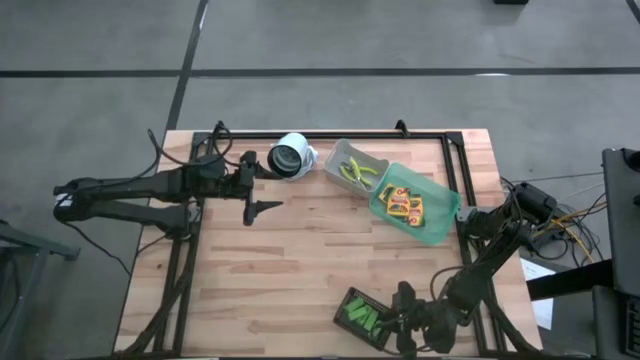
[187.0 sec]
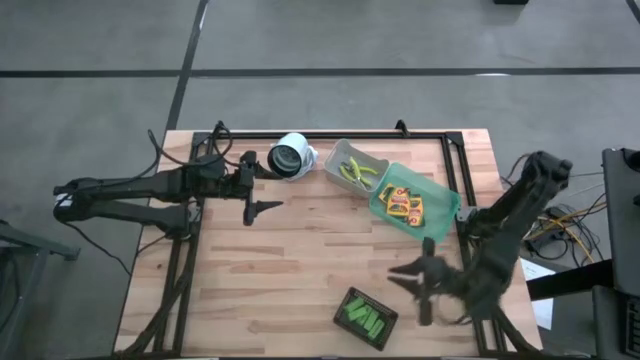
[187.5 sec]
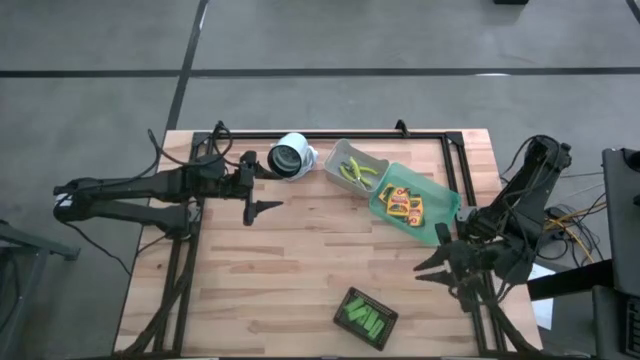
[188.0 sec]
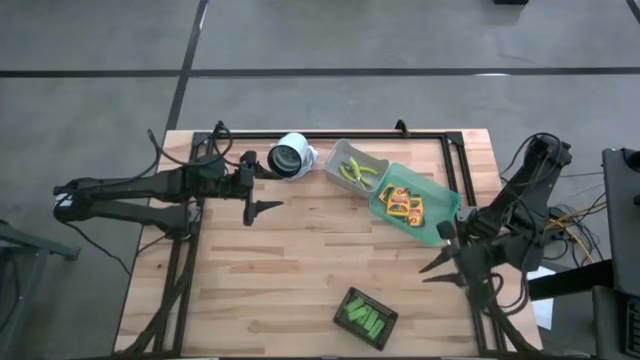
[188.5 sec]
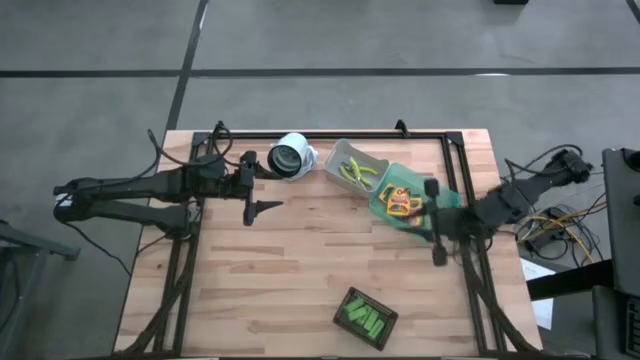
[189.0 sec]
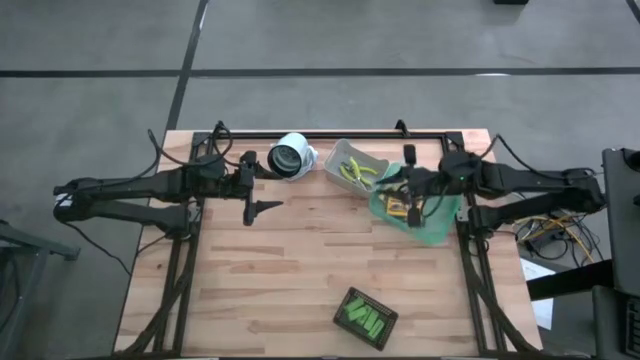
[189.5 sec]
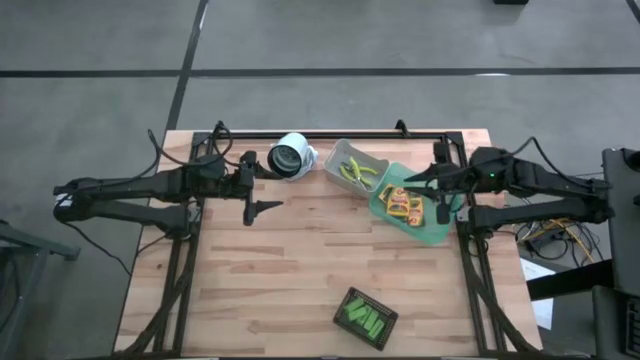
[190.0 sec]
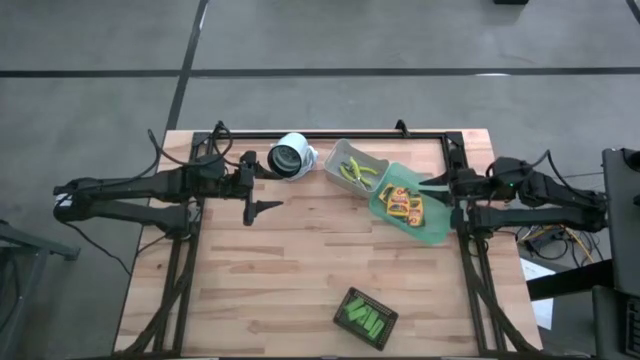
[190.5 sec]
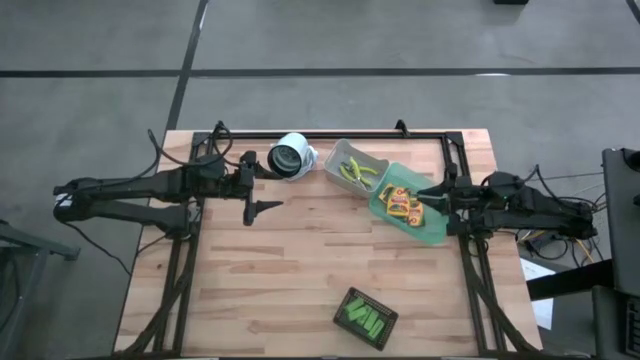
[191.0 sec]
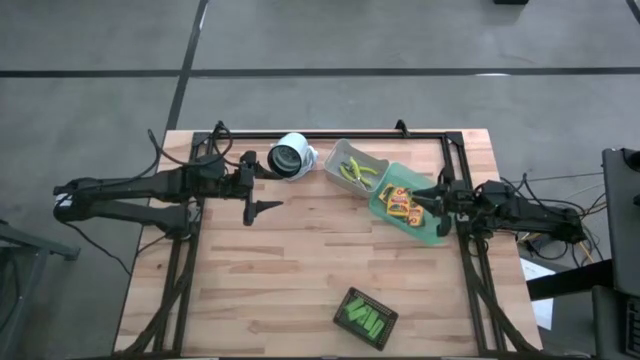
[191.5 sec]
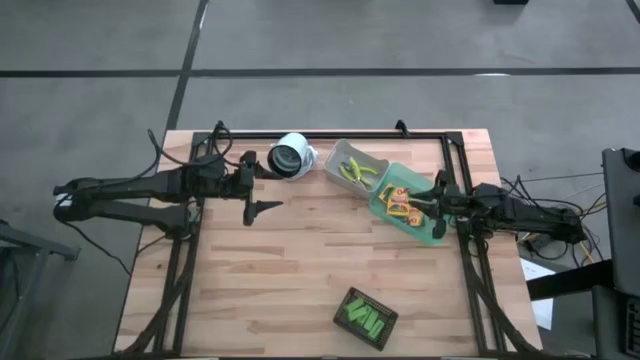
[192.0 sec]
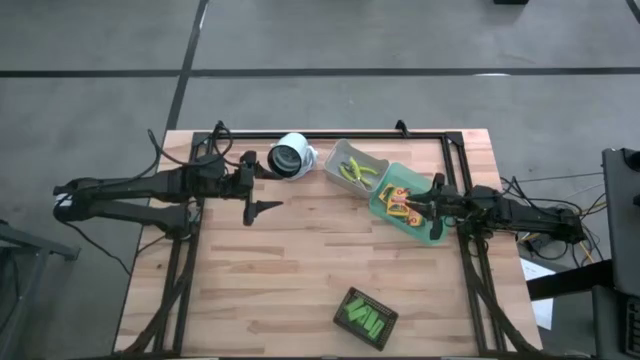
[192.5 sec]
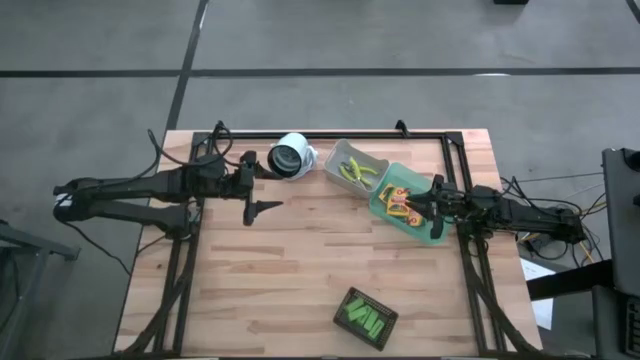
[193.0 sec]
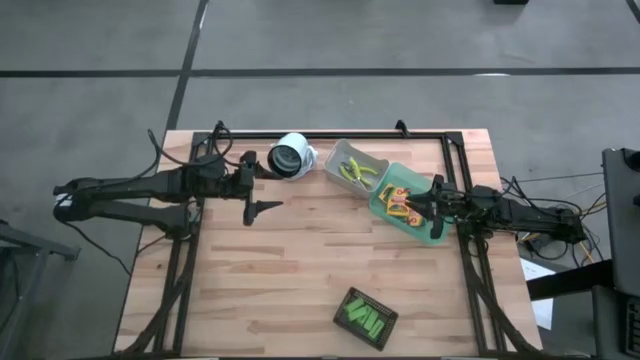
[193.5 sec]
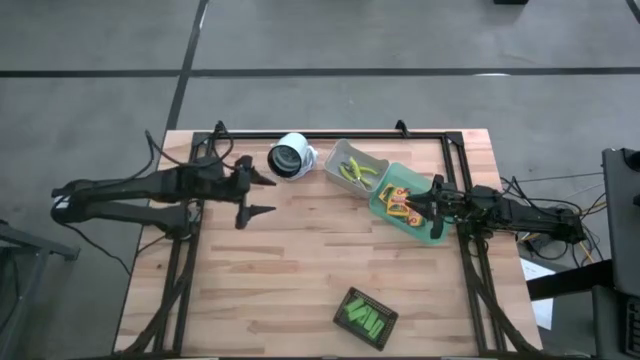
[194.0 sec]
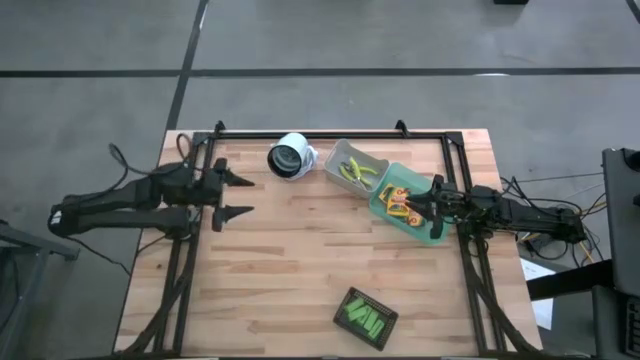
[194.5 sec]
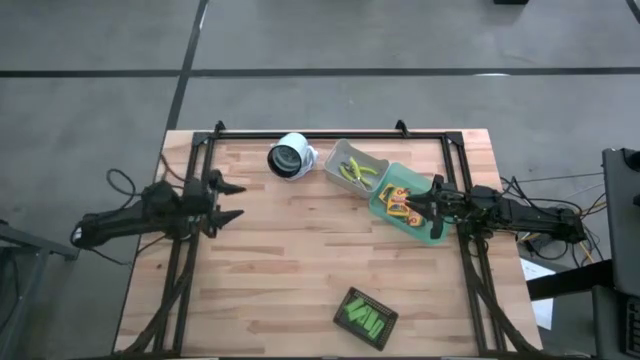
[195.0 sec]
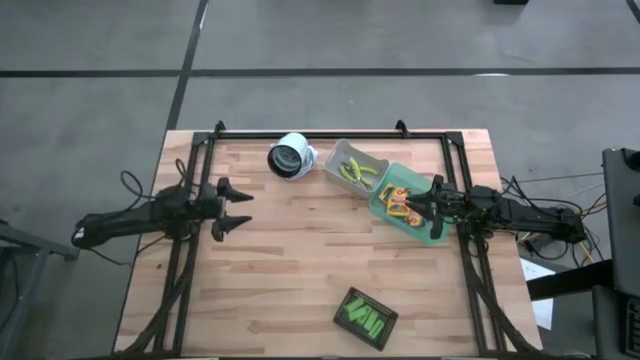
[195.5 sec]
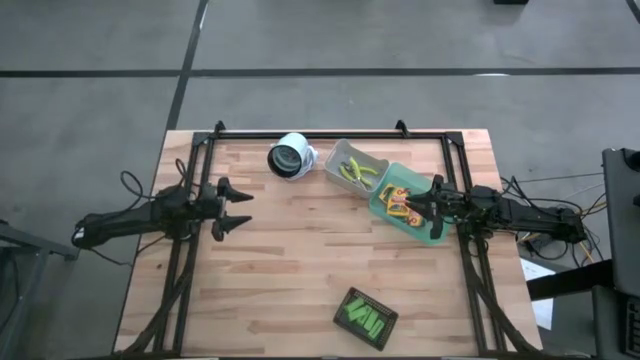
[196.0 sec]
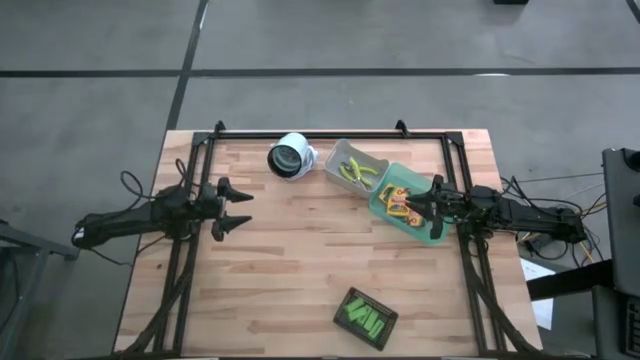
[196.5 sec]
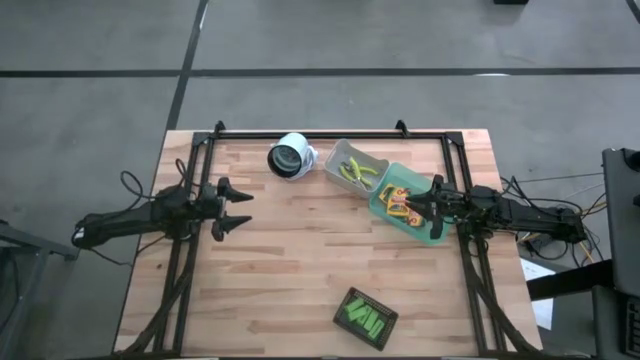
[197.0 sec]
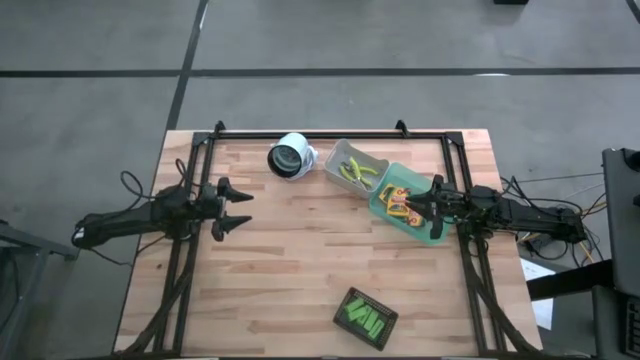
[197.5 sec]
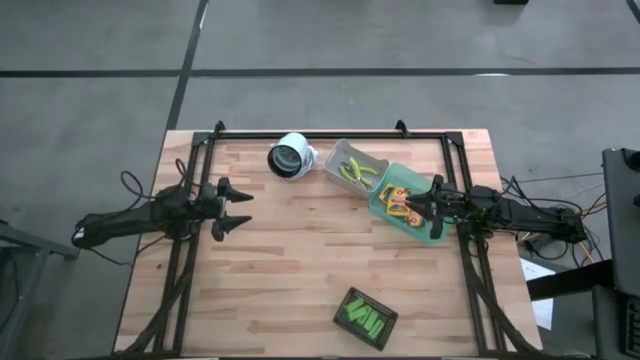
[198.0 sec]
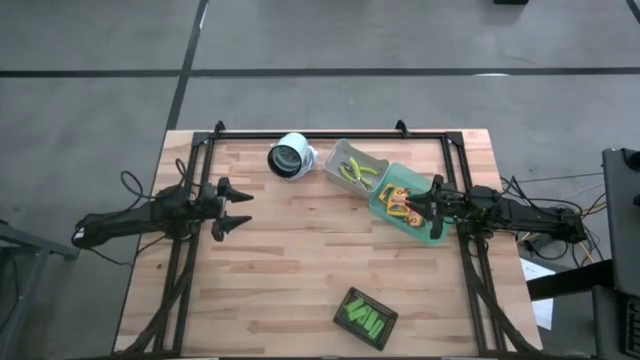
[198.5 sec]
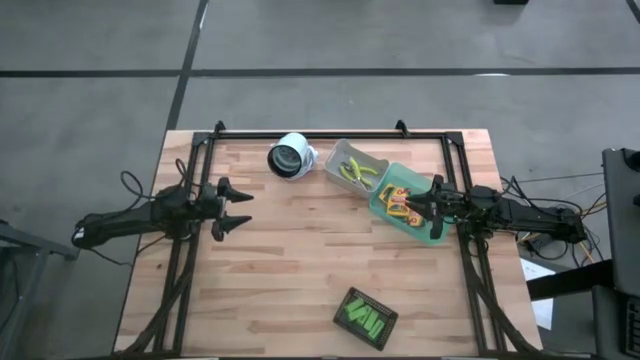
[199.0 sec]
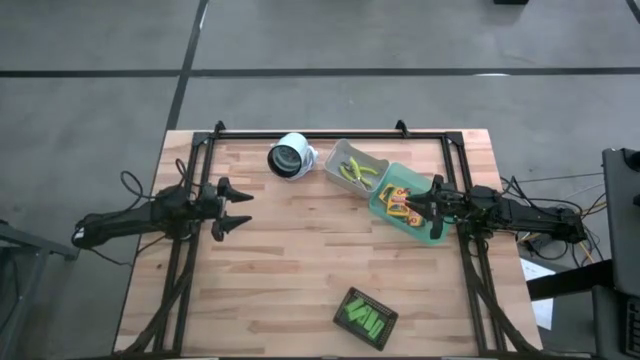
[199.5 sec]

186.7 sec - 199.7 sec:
Task: Pick & Place School Supplies
Return to Home Position

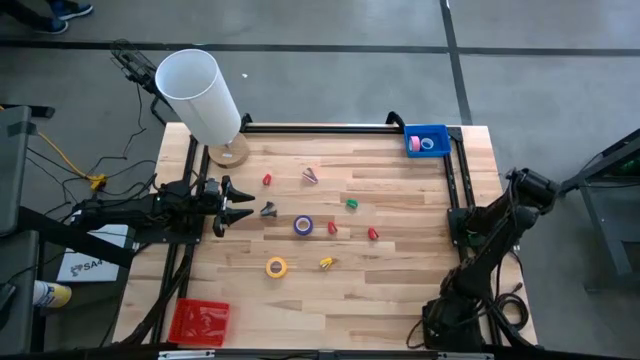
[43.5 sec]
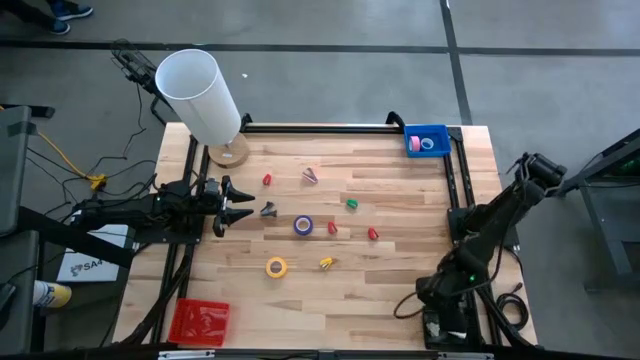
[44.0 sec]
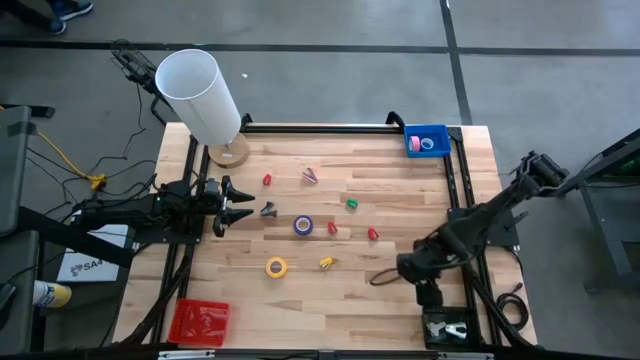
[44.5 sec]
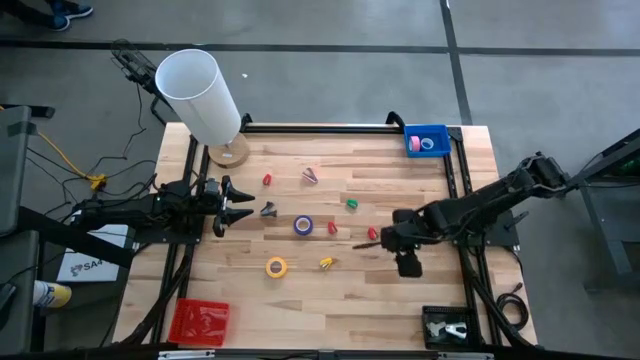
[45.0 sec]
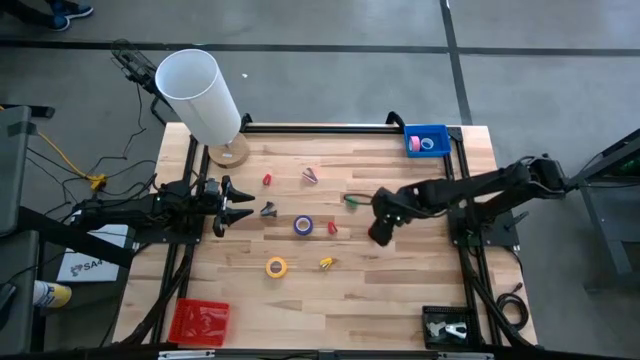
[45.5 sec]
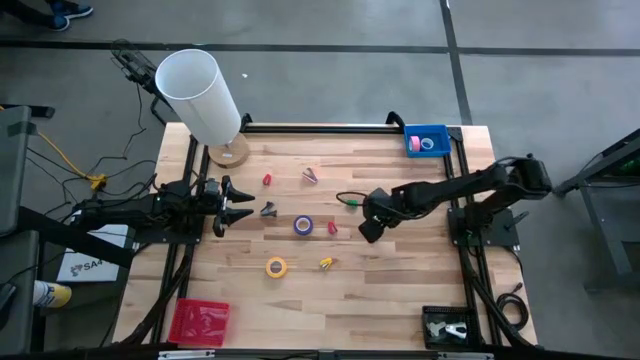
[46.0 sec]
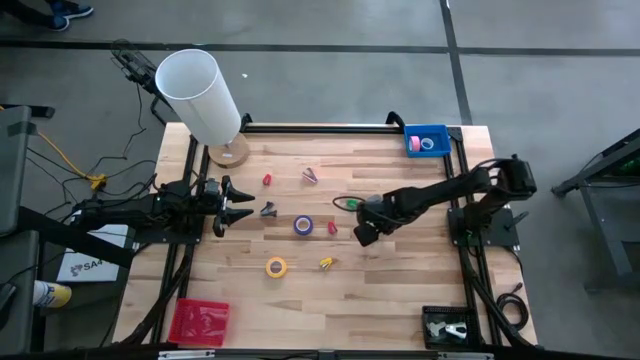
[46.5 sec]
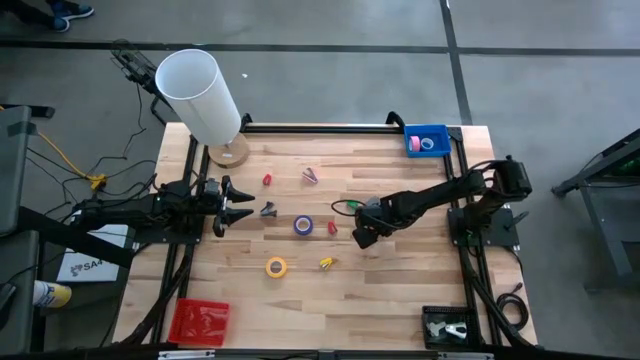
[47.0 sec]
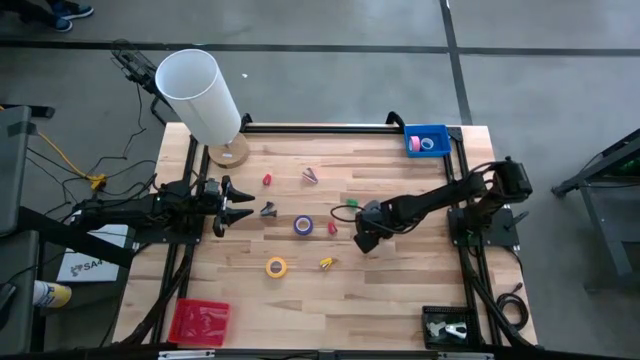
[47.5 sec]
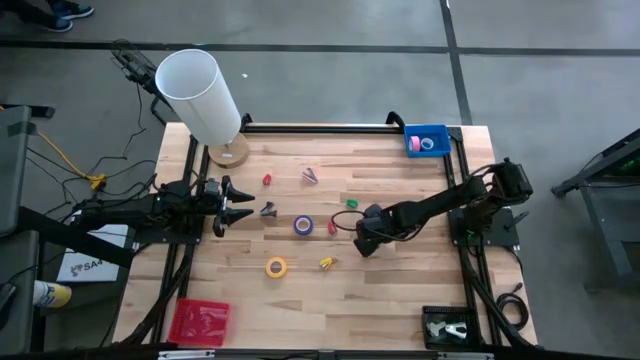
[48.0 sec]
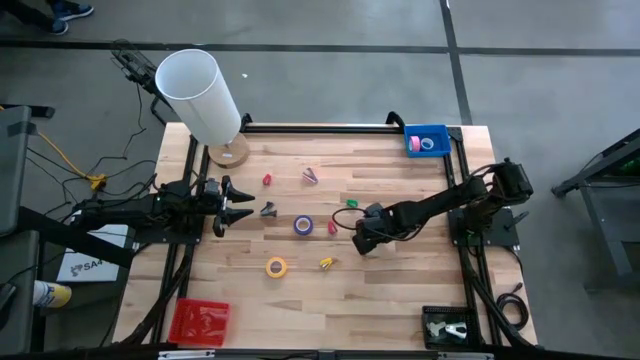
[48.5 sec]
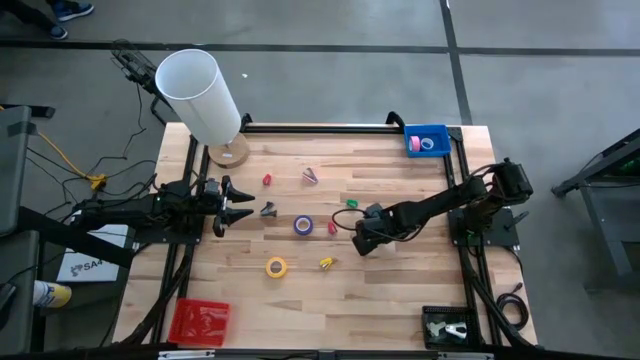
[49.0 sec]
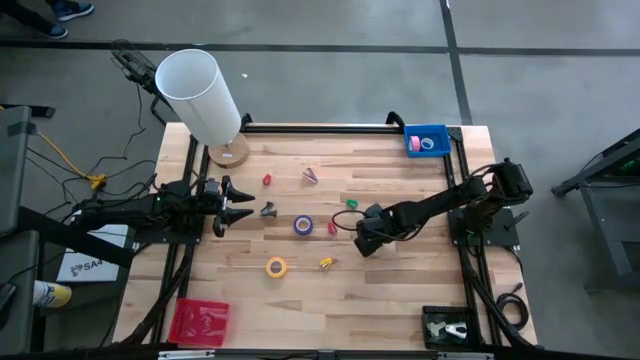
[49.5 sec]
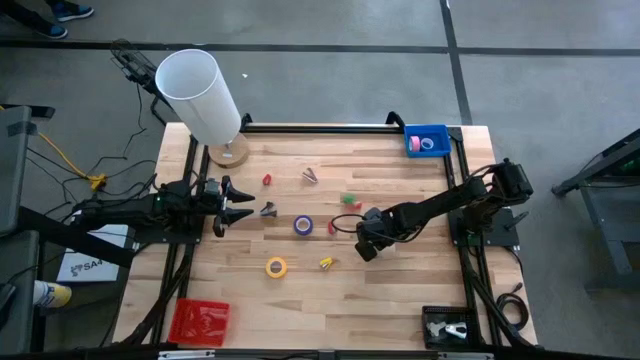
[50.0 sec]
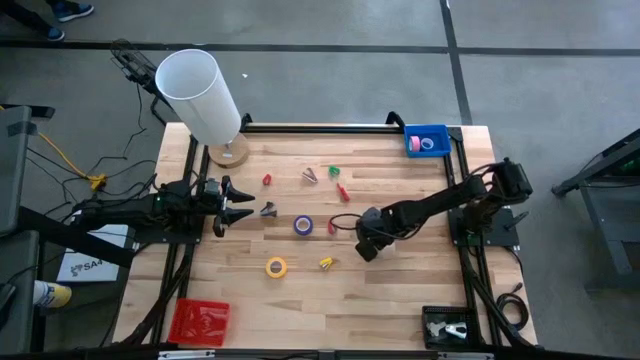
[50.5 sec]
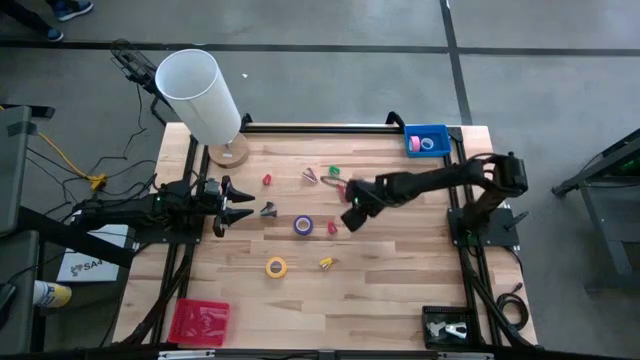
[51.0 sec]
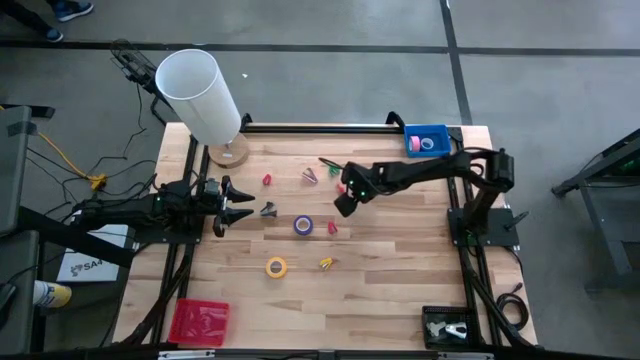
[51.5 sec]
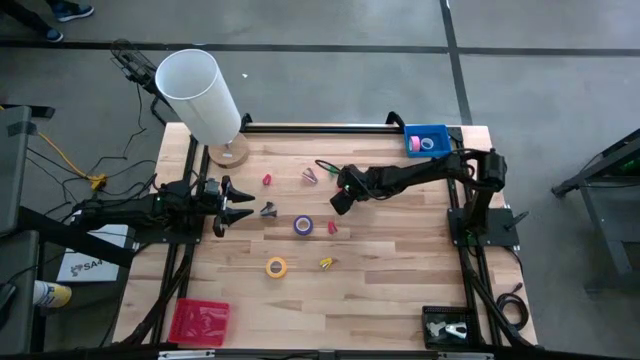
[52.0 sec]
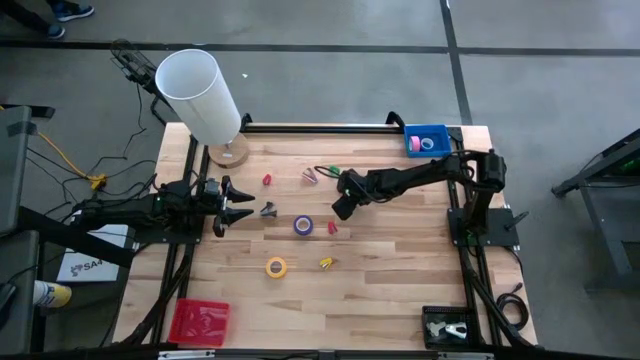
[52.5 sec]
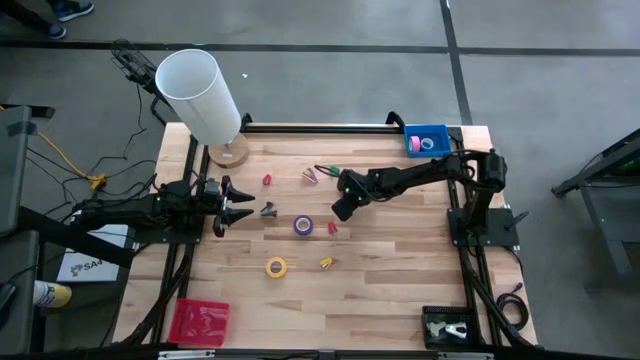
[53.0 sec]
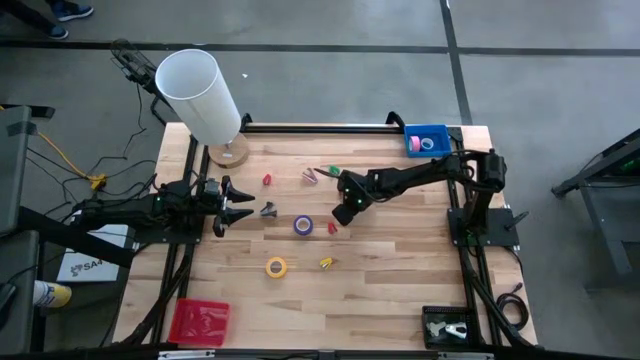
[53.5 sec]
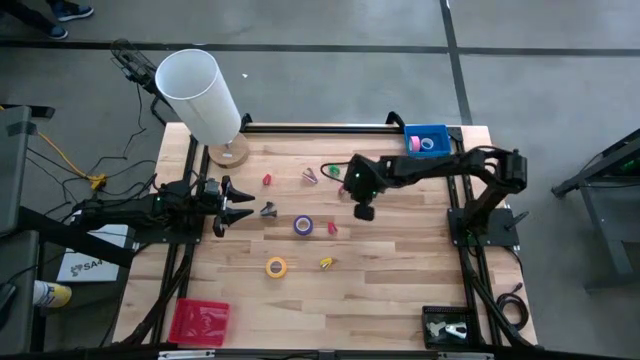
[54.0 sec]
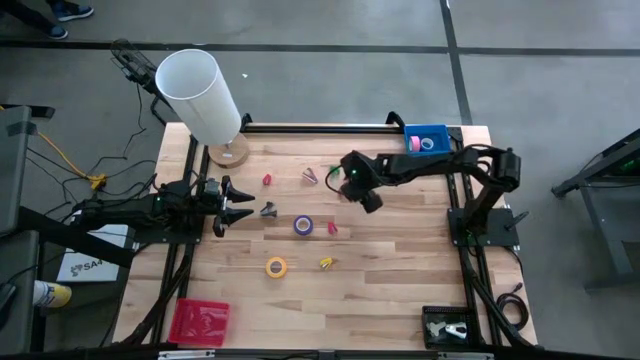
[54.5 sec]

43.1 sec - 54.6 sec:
Task: Pick and place Stapler, Stapler remover, tape
Put the bottom right red stapler into the red bin
